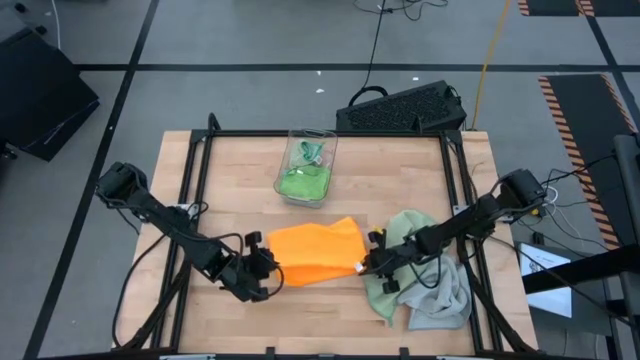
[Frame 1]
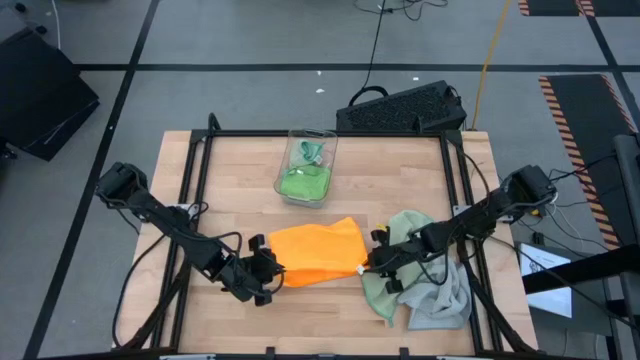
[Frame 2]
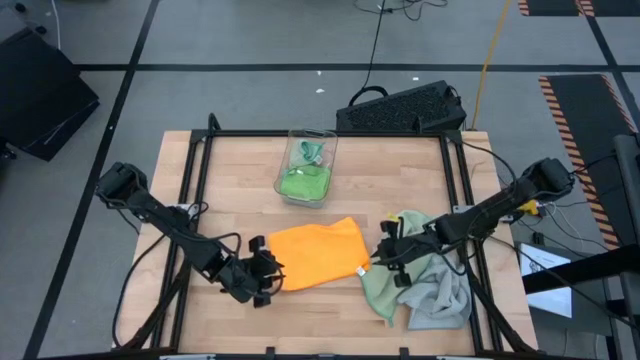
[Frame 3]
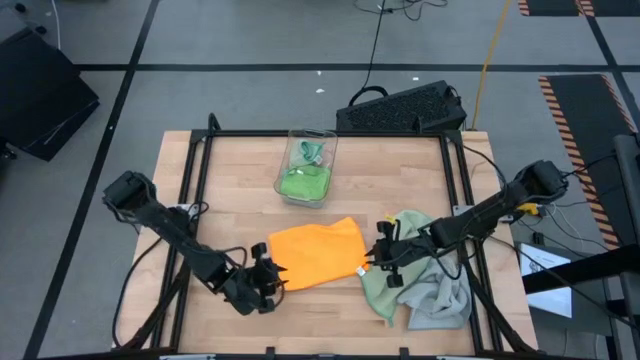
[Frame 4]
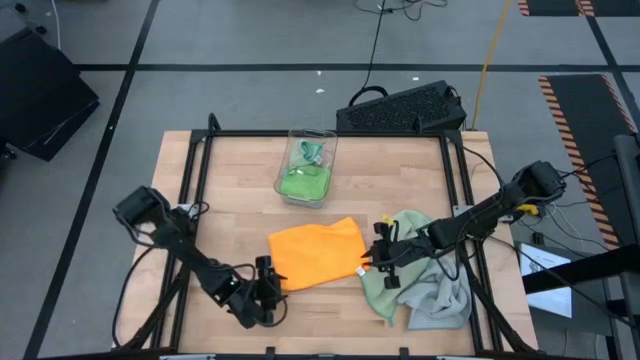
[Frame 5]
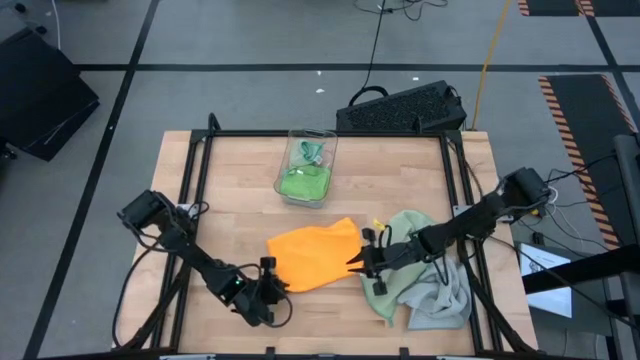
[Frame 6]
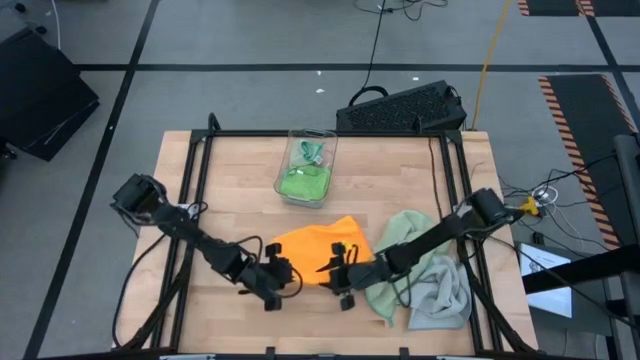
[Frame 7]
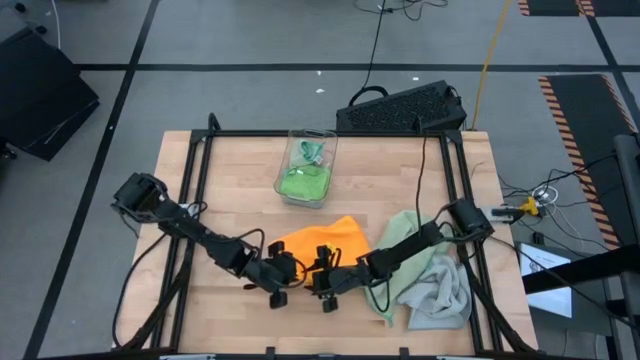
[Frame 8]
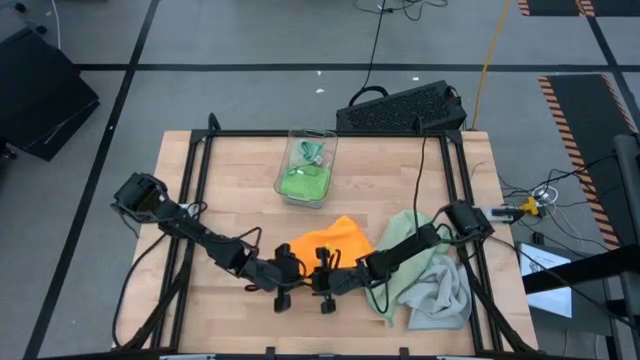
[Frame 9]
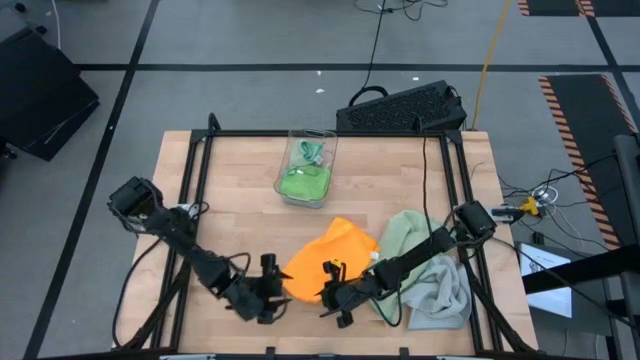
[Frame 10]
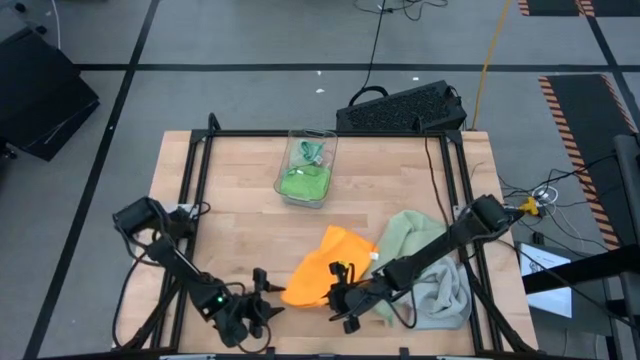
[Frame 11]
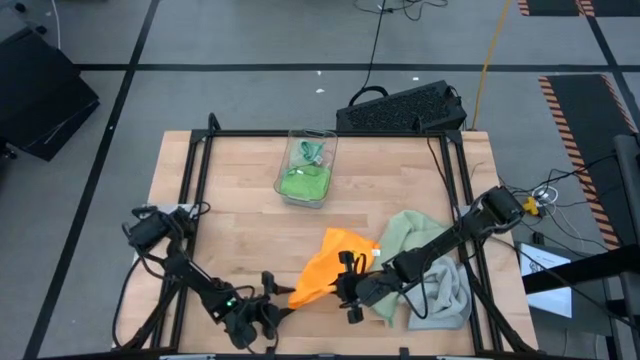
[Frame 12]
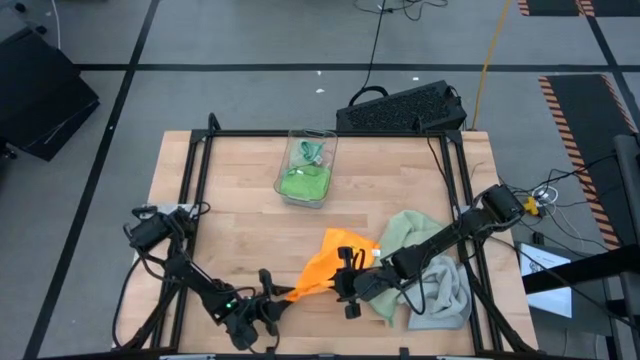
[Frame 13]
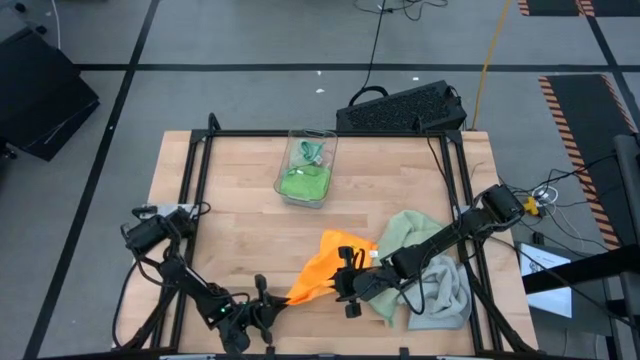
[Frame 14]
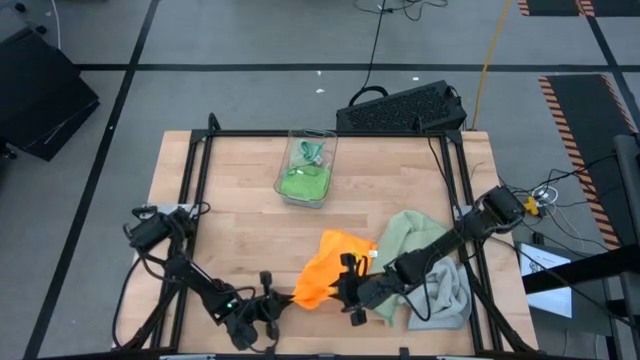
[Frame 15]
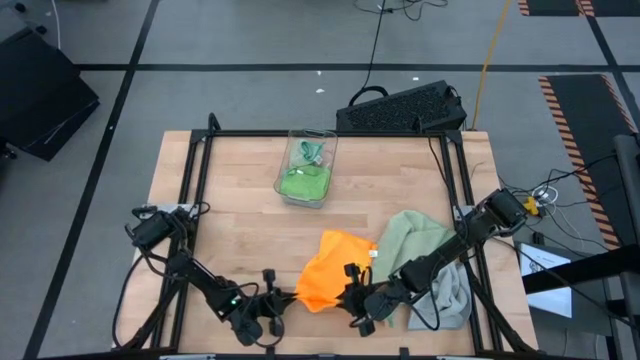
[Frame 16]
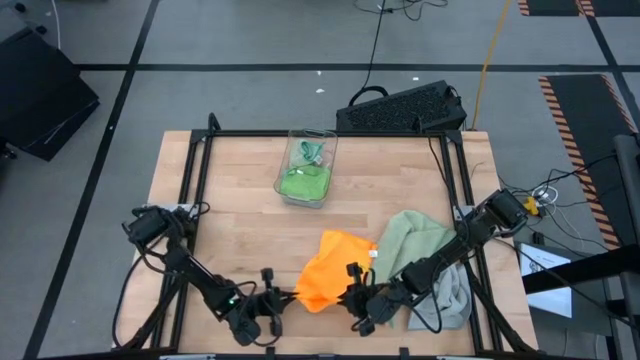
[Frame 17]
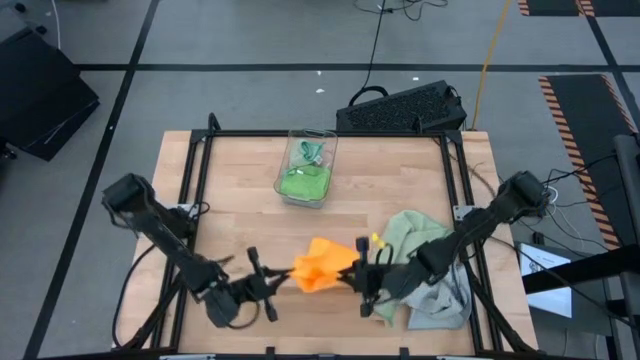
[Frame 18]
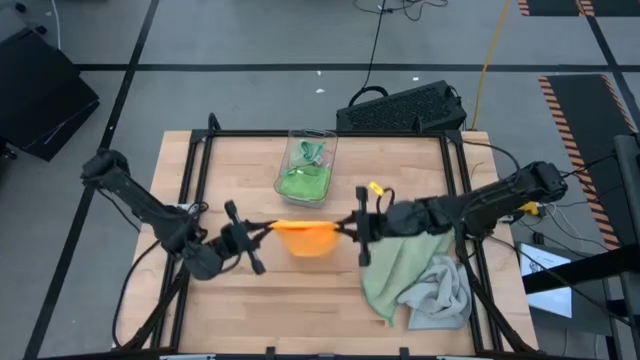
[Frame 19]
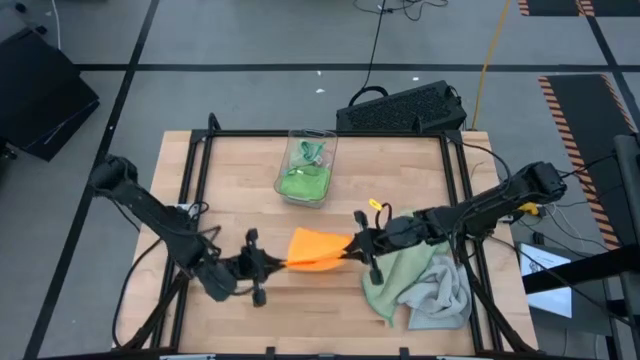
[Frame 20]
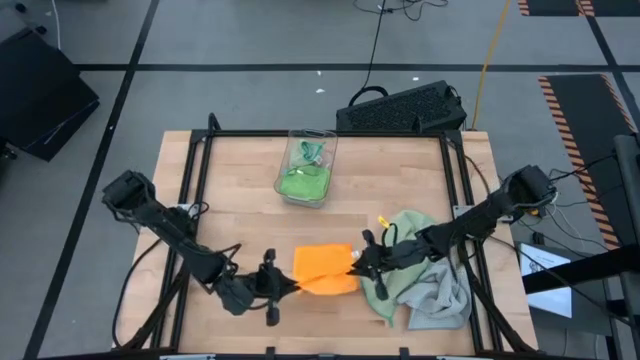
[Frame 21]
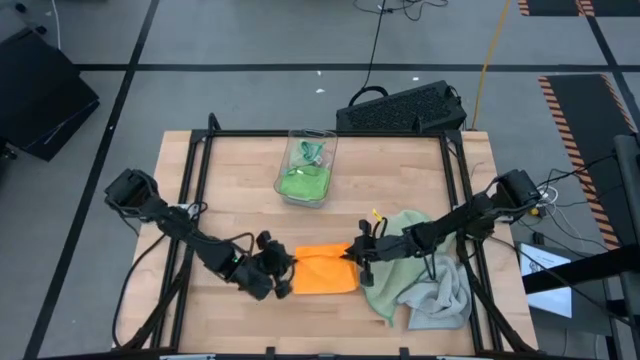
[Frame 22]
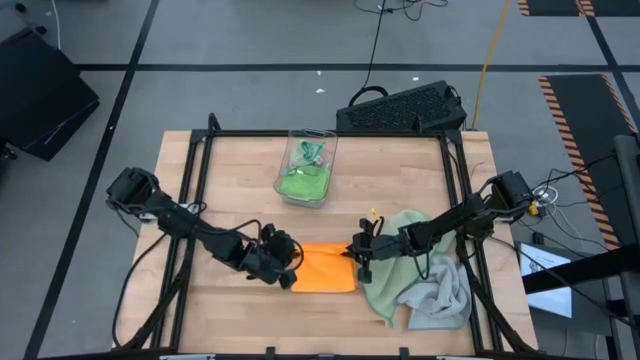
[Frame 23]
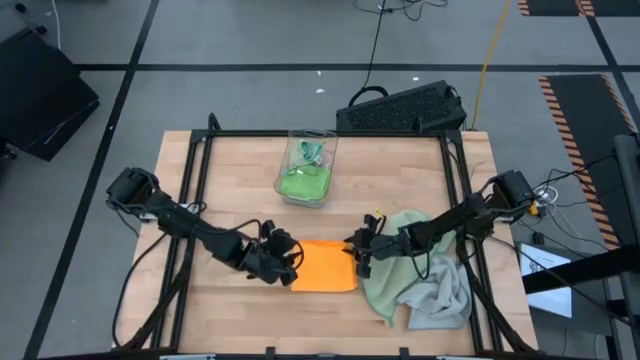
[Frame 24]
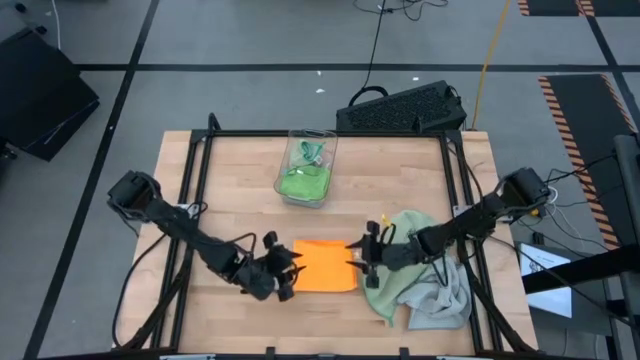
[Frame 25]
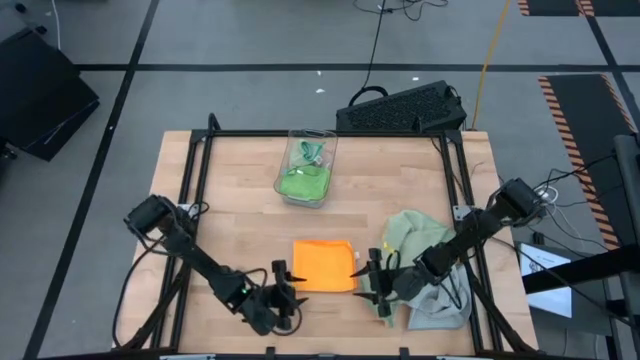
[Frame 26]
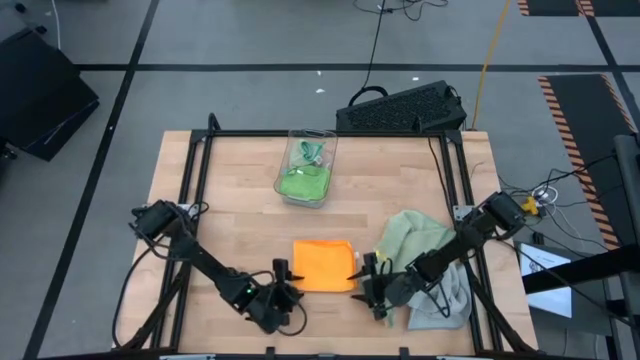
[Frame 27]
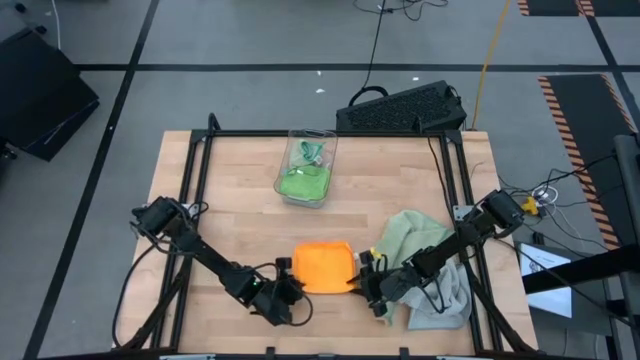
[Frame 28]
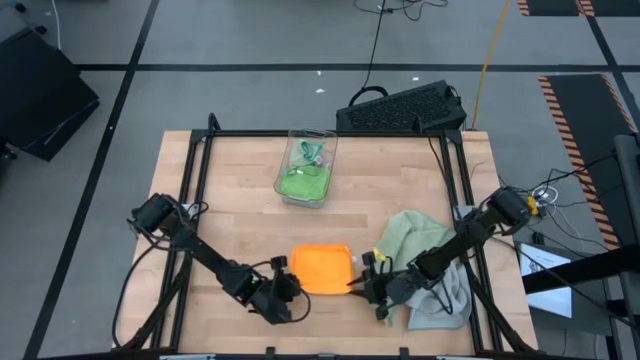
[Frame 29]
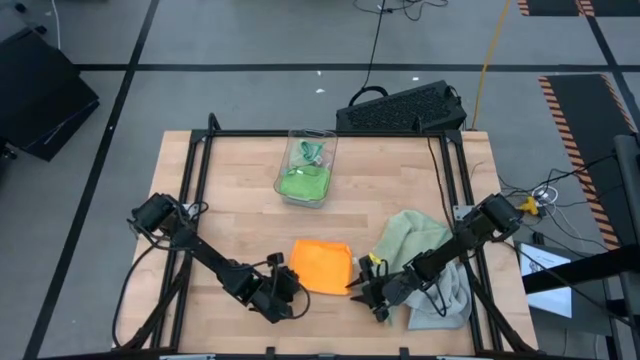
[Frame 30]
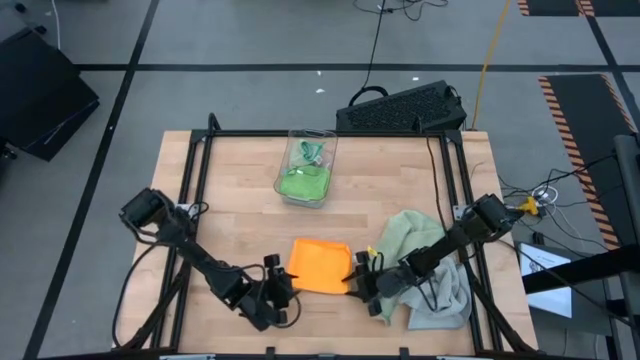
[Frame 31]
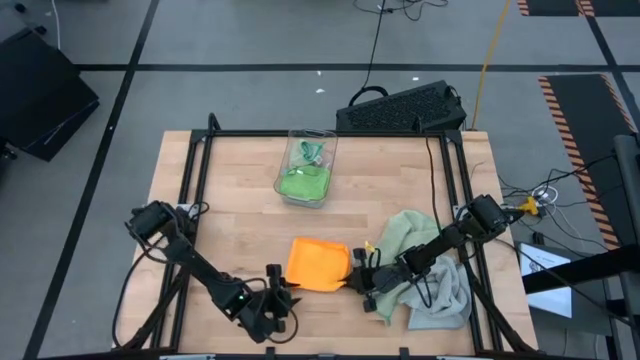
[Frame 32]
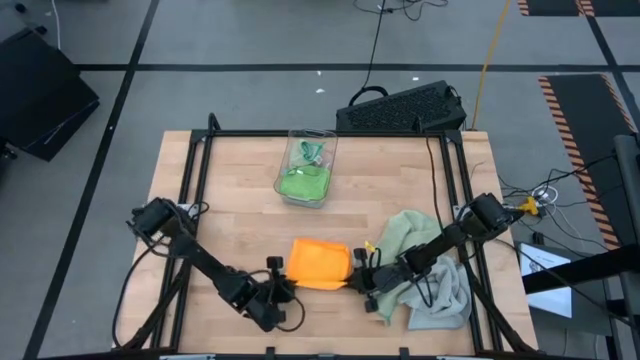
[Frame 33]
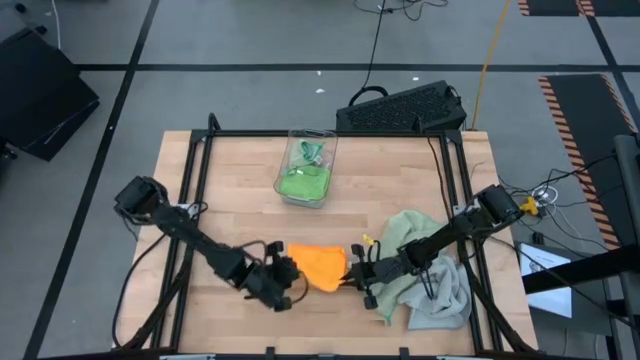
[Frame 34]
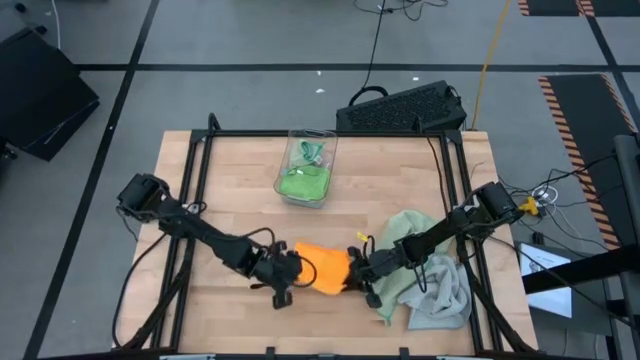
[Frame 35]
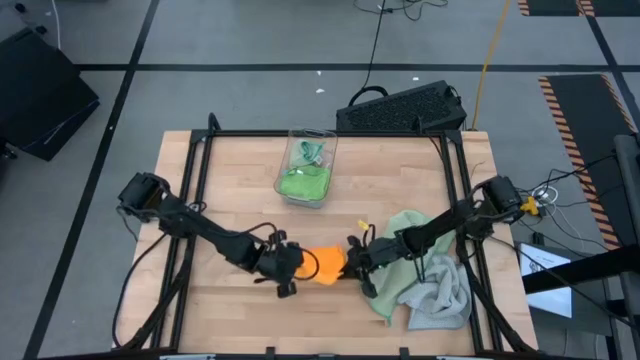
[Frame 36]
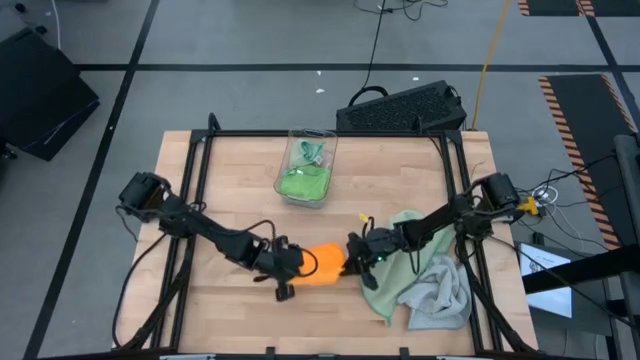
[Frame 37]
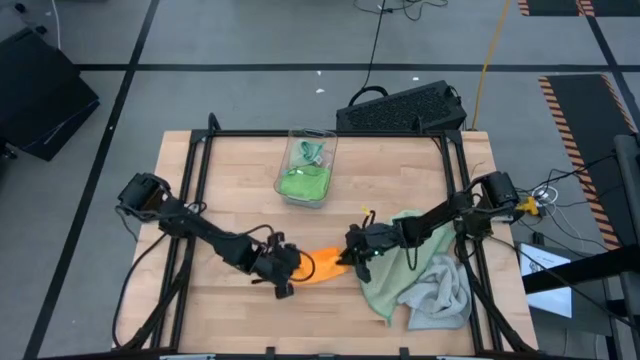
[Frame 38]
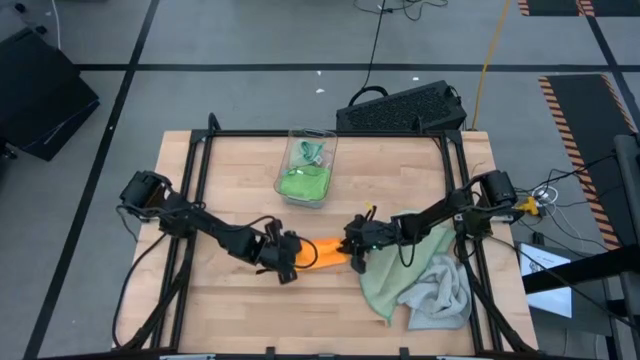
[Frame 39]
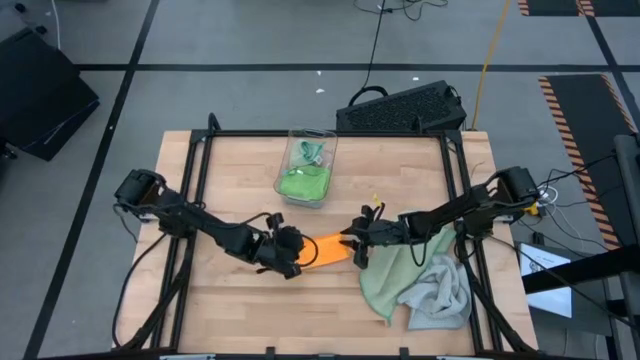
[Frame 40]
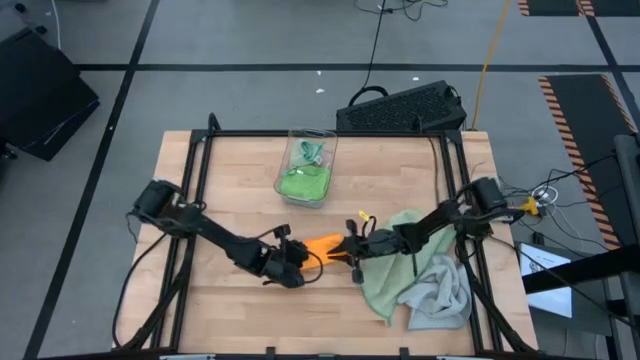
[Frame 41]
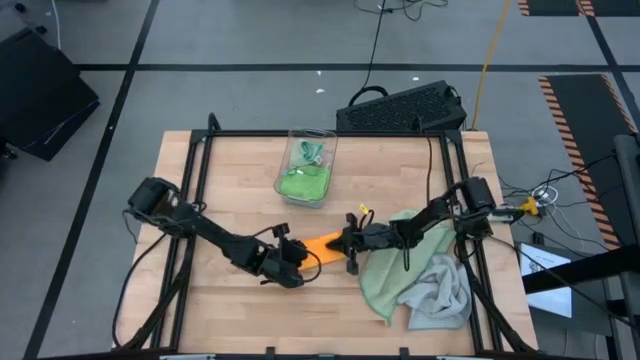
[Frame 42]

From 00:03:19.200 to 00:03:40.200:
Task: Fold microfiber towels
Fold the yellow towel
